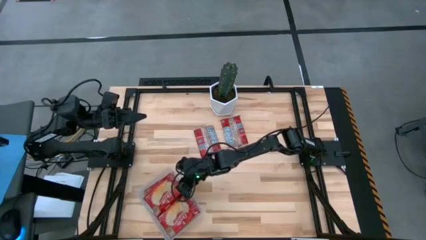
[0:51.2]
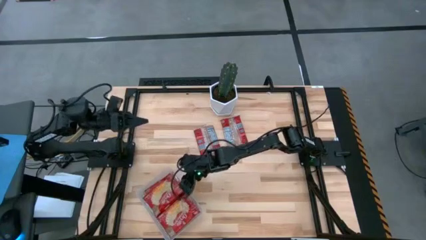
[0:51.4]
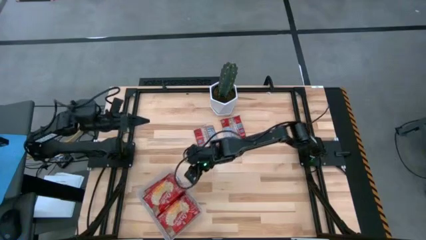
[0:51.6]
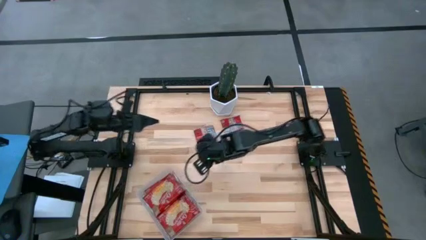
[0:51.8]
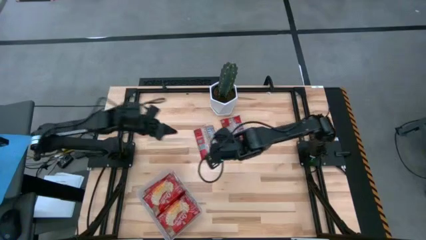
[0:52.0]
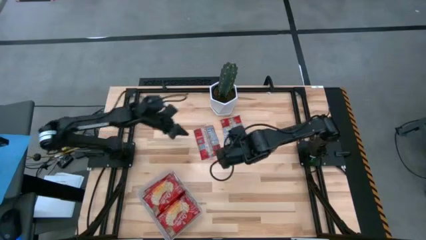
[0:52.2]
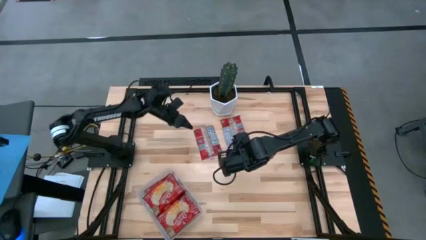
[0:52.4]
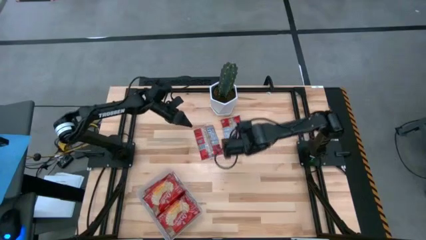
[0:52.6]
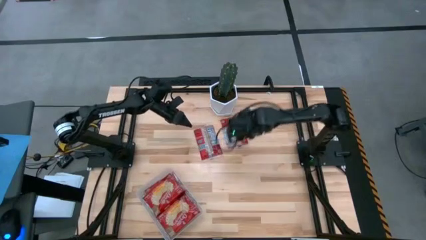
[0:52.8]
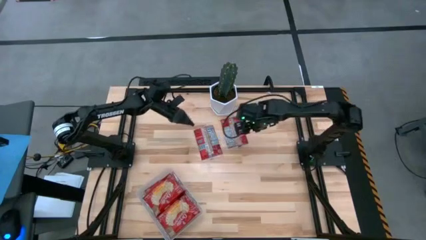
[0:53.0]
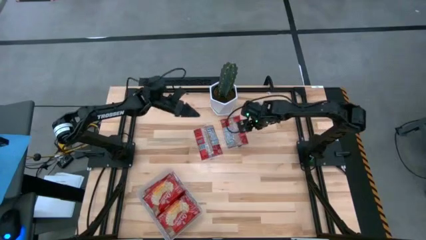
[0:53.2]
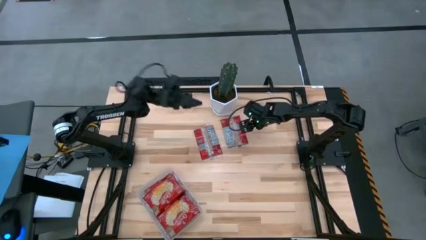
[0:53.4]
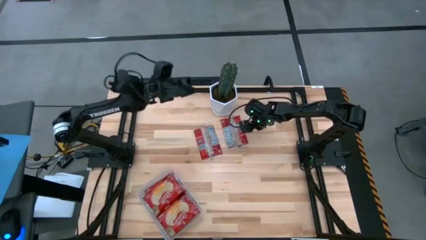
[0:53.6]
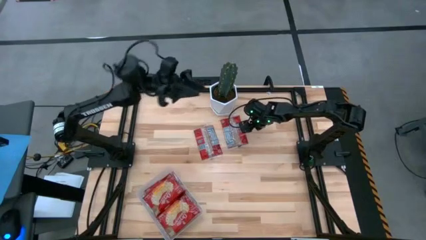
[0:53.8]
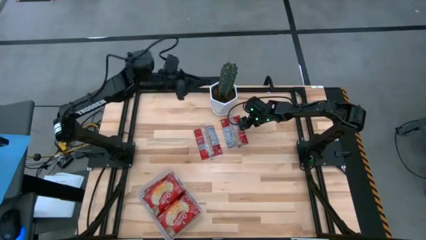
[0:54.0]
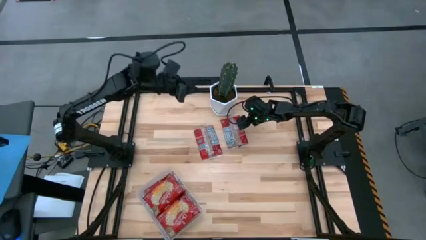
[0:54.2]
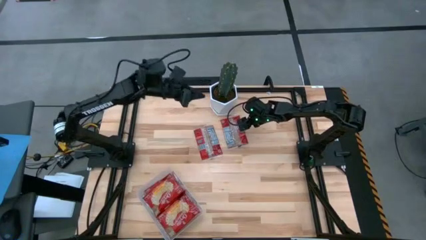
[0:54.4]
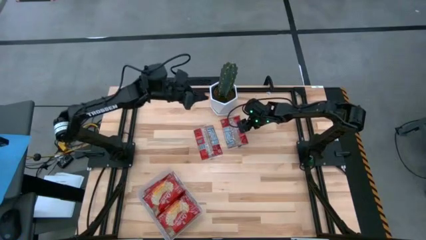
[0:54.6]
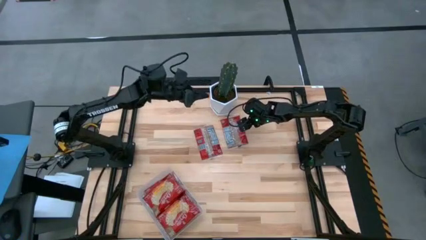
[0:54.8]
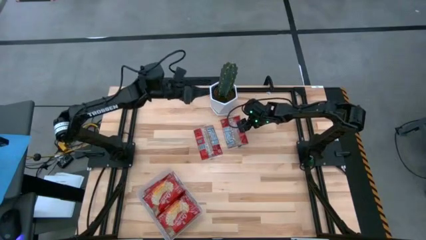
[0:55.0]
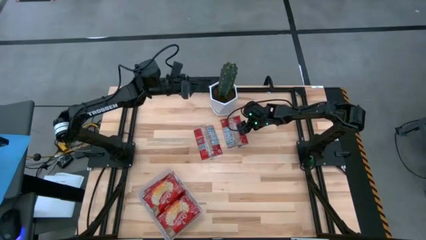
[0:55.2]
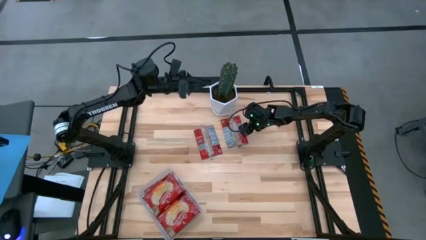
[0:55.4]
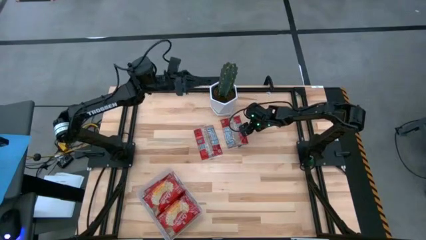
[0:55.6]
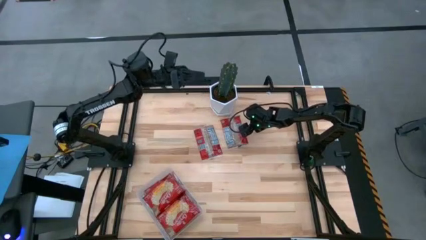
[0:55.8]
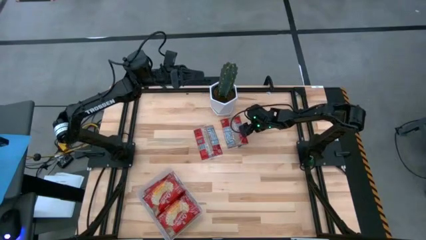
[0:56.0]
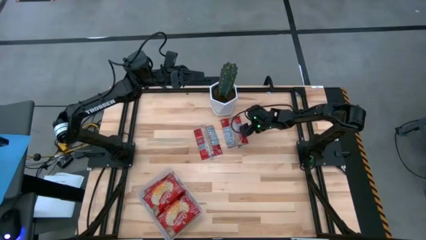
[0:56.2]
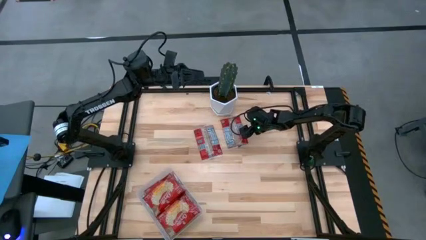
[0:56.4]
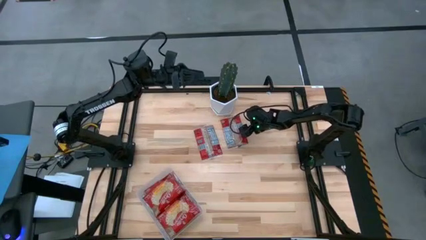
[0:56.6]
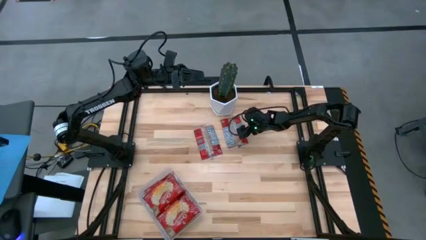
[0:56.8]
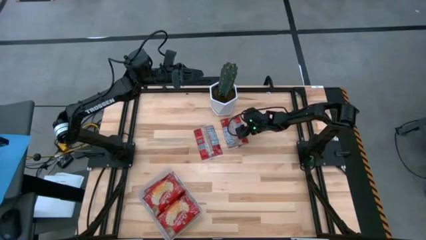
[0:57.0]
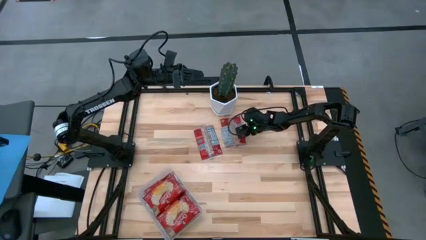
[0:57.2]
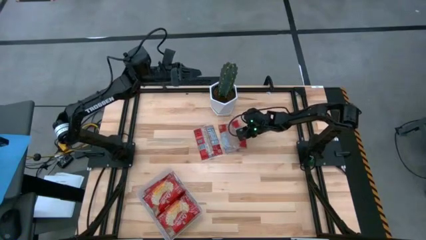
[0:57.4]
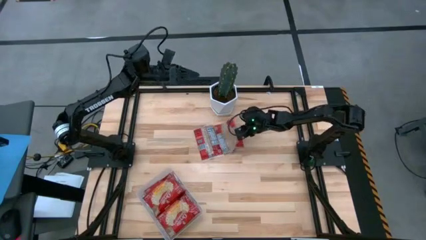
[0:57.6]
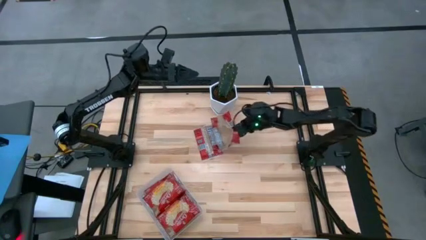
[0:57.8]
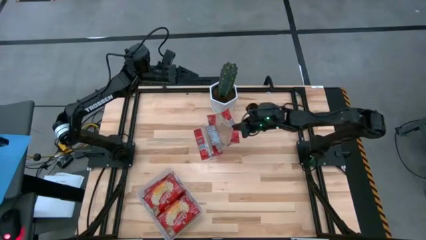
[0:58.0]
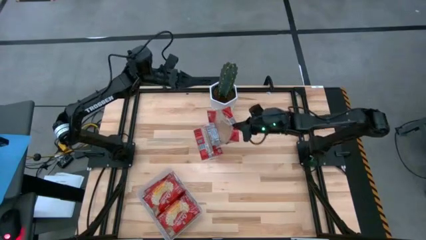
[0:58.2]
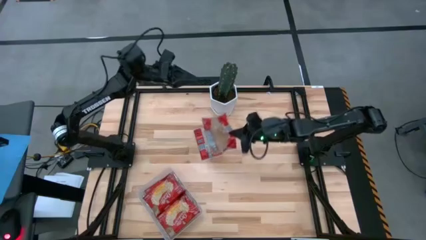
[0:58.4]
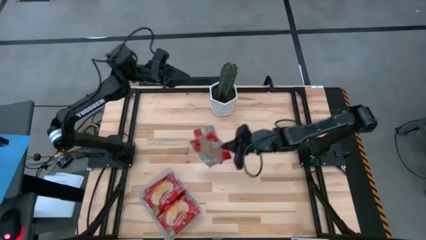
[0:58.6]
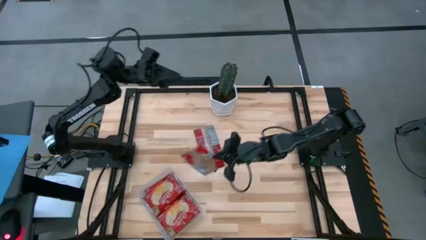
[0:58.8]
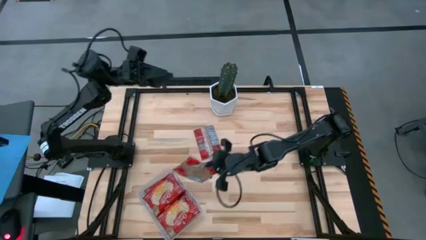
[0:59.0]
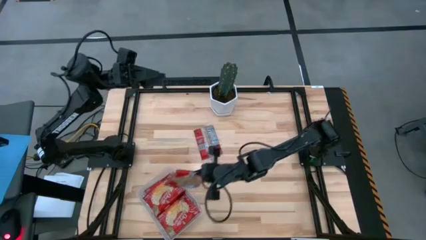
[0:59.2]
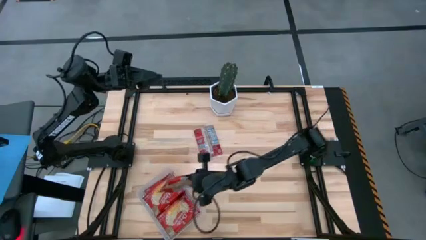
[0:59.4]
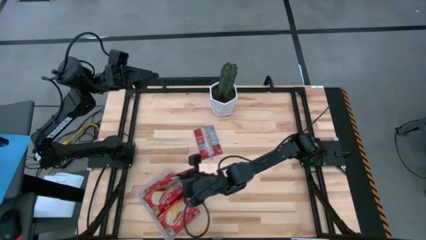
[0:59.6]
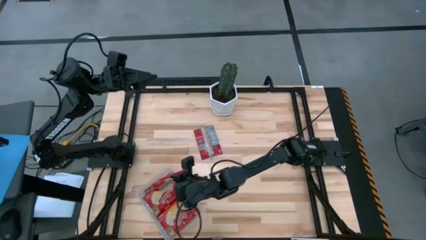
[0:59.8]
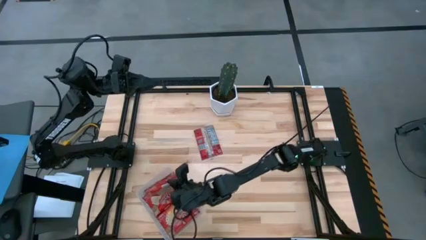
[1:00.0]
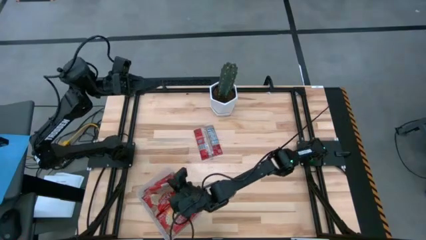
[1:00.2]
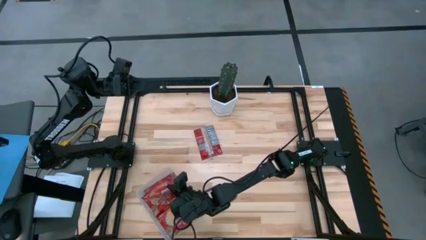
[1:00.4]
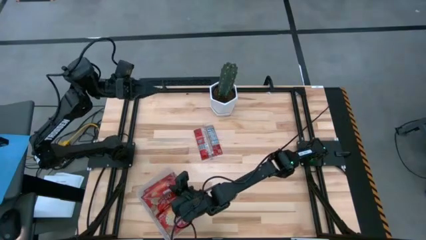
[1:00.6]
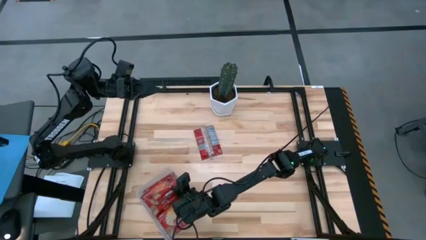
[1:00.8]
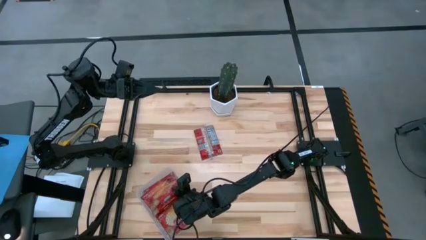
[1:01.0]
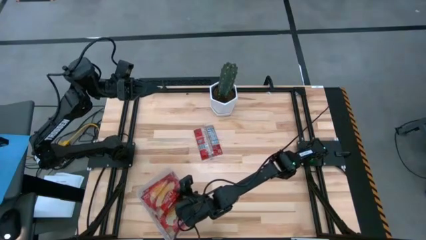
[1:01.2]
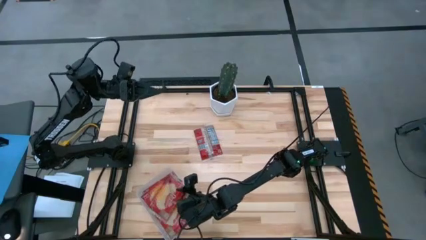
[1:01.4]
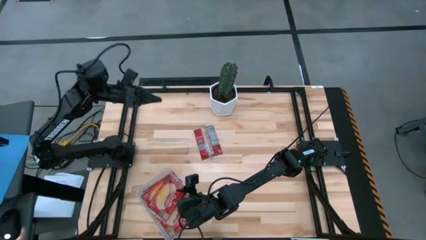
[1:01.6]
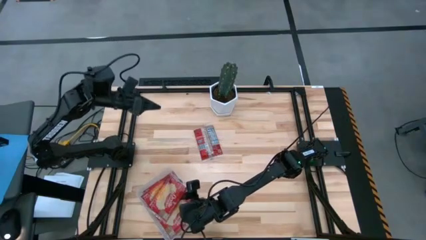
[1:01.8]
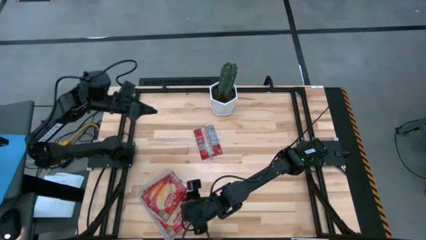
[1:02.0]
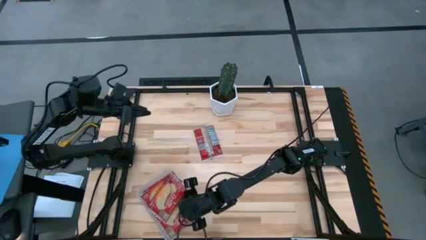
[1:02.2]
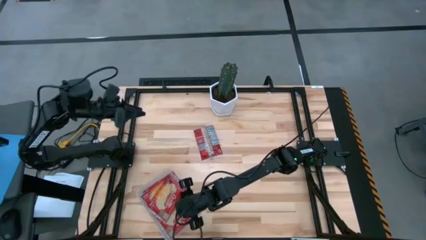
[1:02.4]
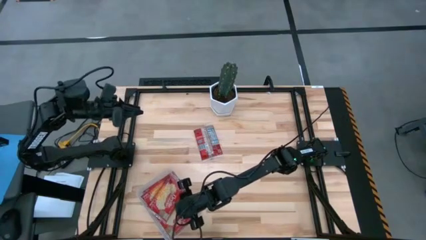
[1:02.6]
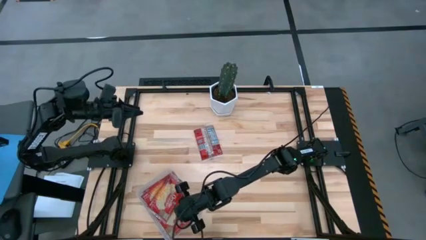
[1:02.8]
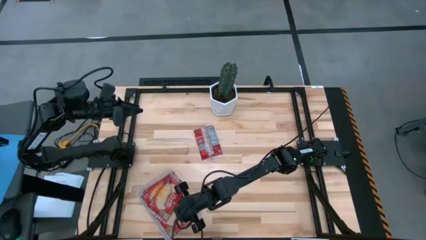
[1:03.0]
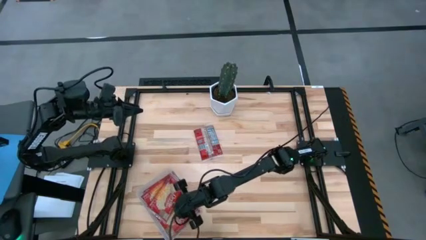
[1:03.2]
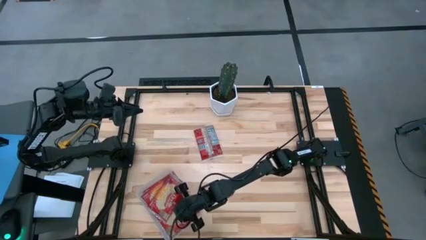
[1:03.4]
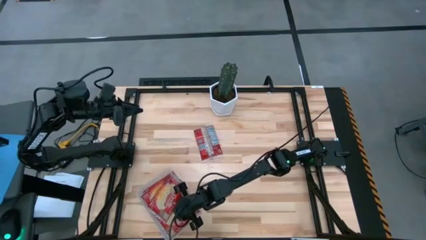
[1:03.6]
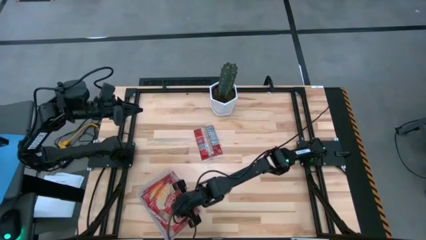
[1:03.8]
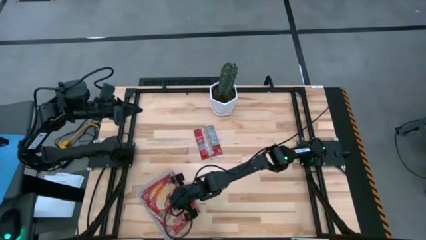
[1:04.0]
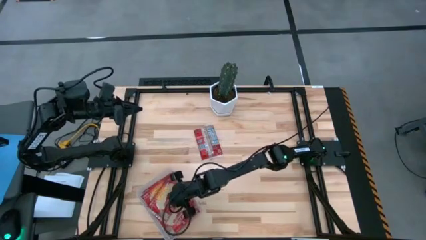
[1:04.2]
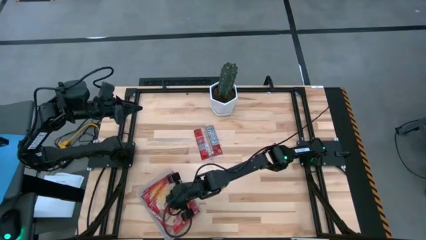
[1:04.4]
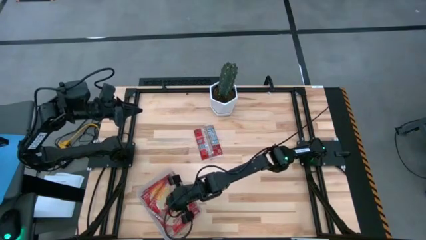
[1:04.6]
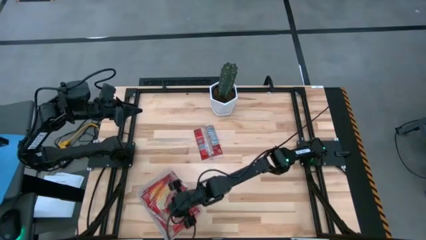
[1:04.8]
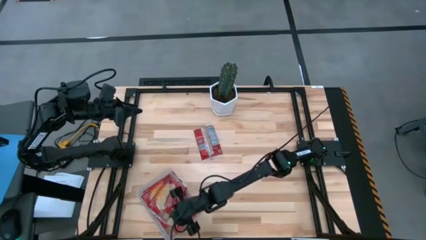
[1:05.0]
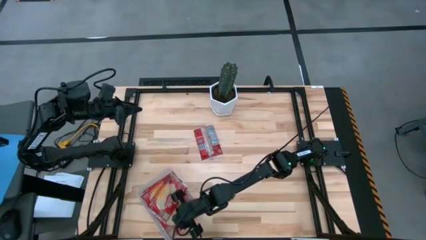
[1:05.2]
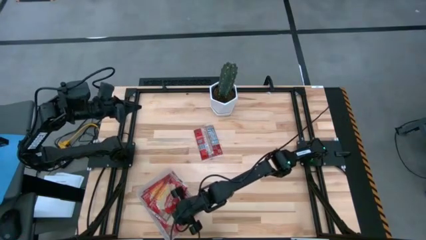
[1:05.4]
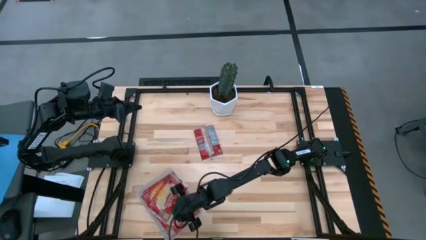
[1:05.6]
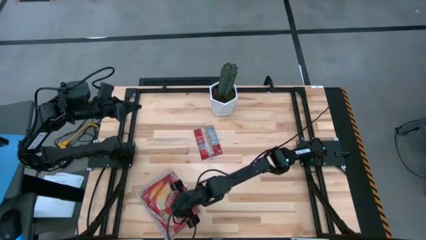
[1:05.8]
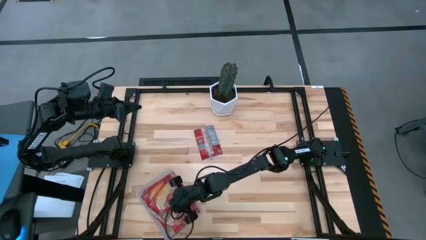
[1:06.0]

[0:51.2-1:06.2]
Task: Sort popcorn bags into baskets
Put the right red popcorn bag into the transparent bin

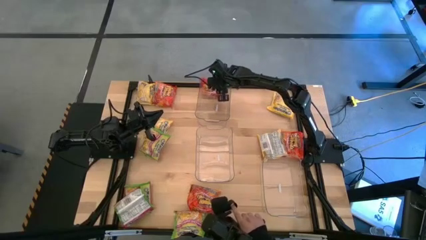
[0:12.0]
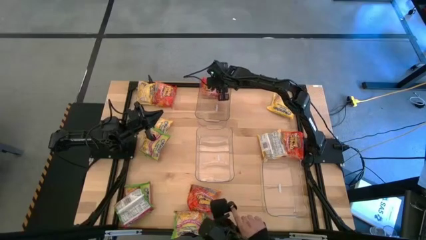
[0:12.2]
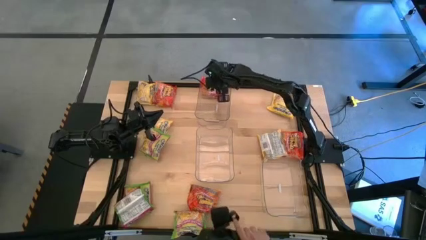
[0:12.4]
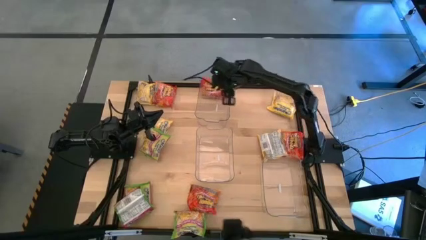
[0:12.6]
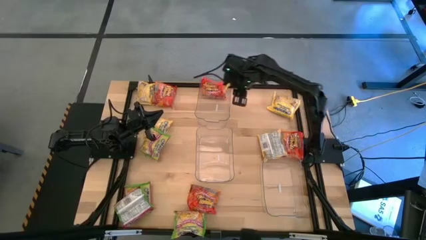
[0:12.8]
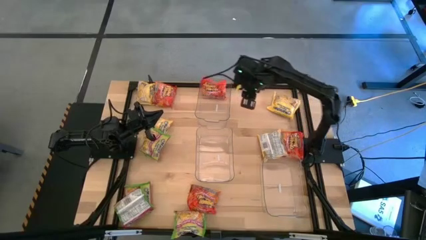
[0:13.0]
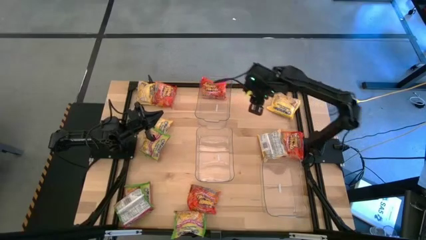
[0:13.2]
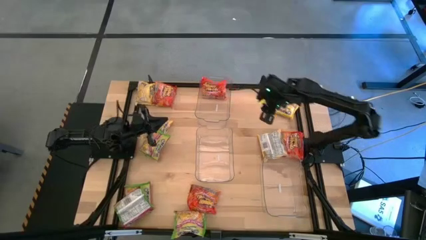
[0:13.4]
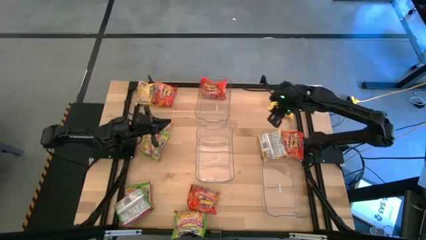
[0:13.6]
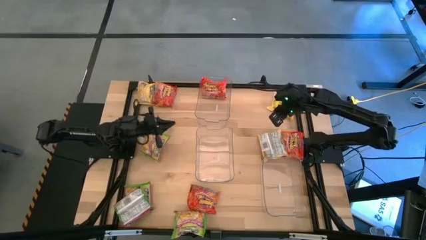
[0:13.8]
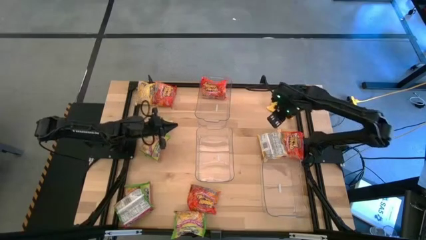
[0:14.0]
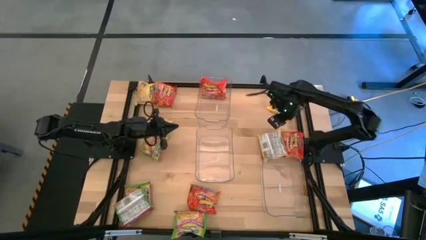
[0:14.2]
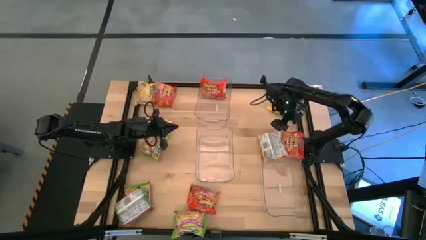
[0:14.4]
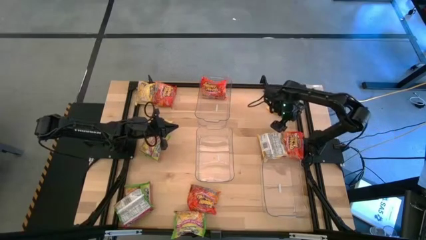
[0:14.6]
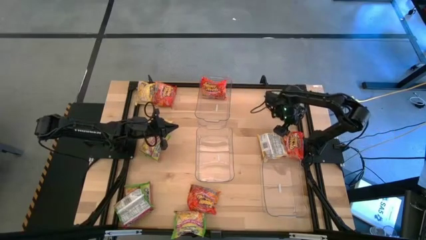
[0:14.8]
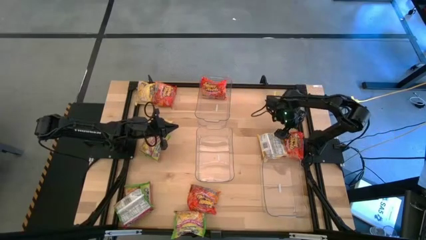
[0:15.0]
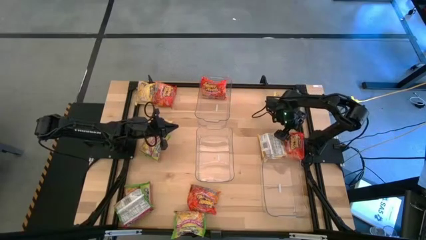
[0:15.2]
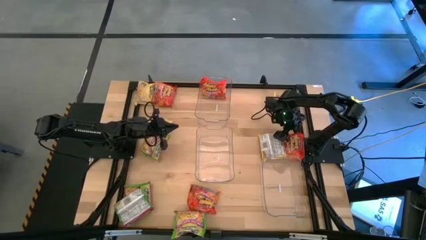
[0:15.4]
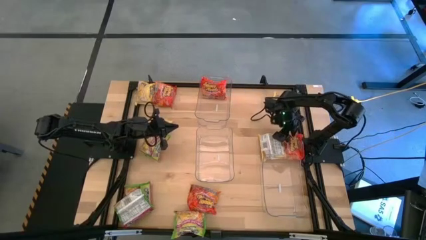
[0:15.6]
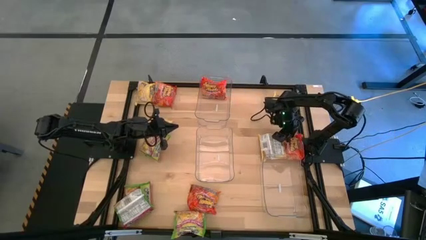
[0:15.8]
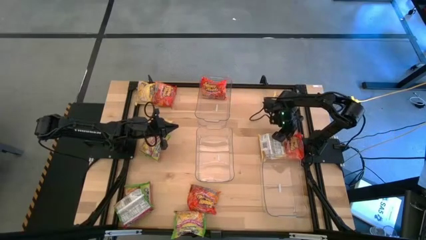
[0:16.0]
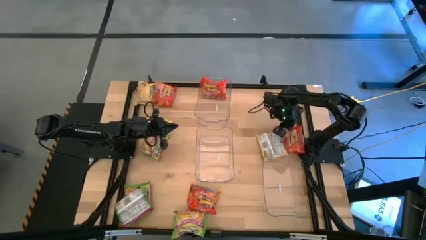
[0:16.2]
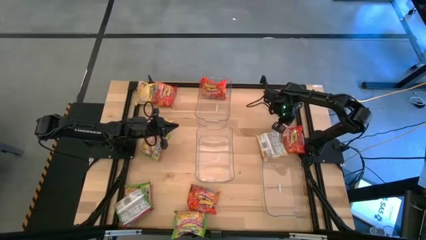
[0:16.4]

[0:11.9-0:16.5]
Task: Sort Maruchan noodles
Put the orange noodle pack into the top transparent bin
